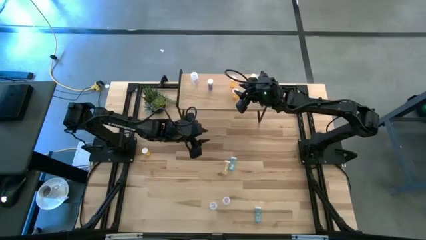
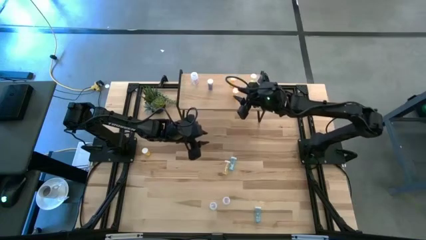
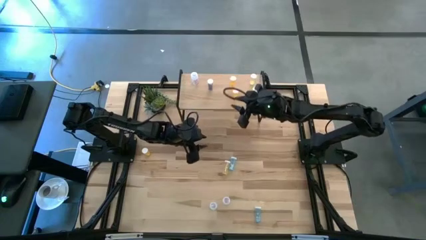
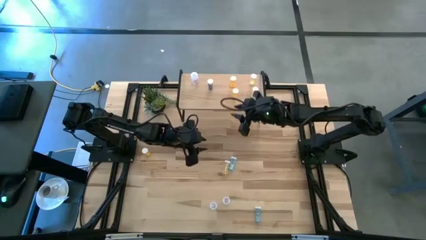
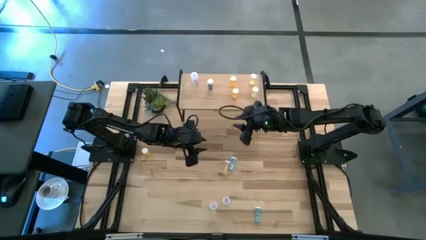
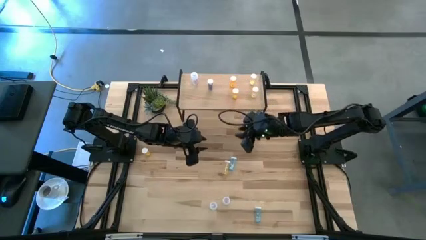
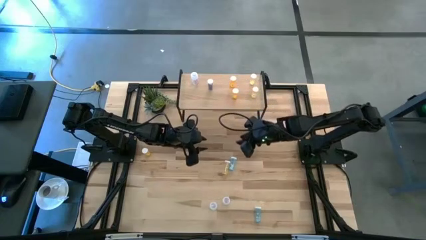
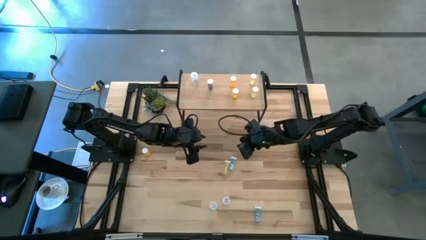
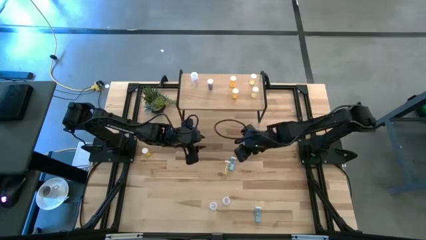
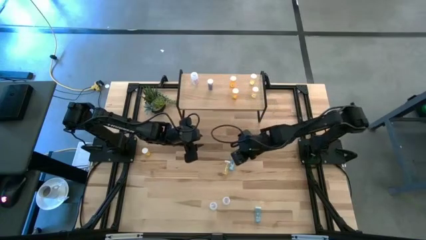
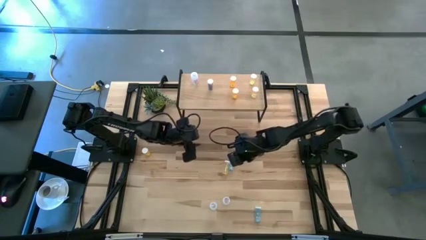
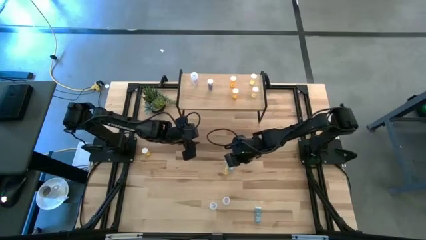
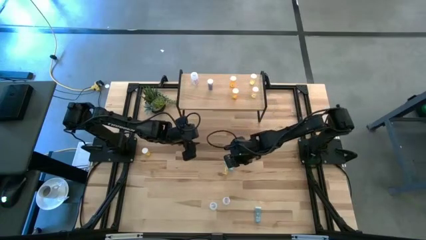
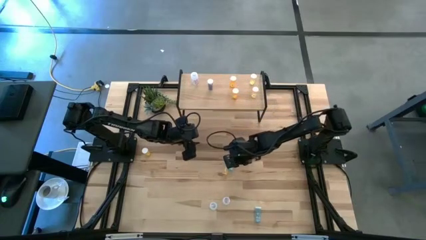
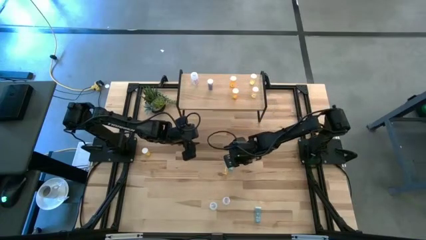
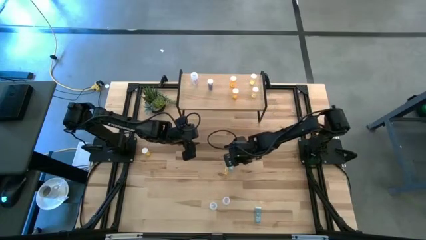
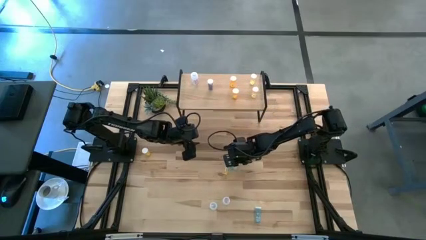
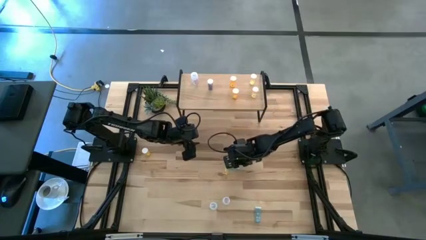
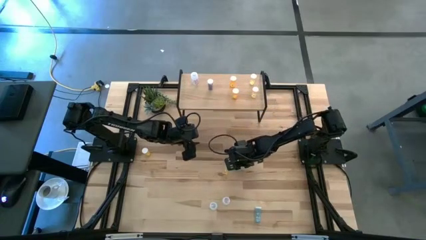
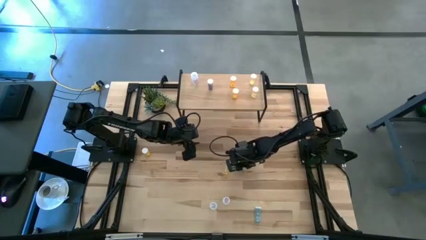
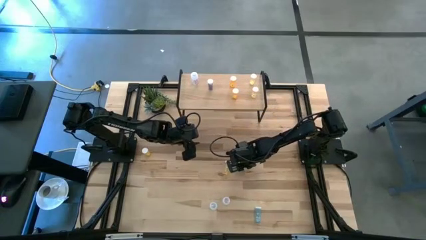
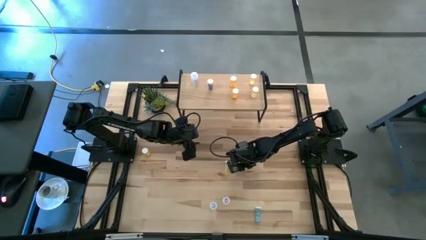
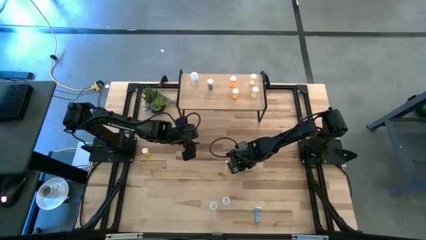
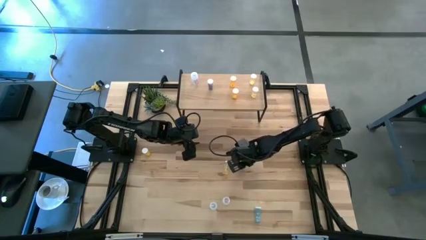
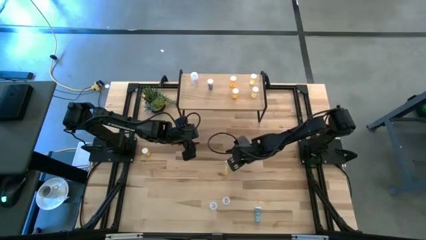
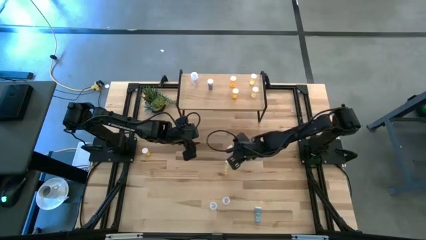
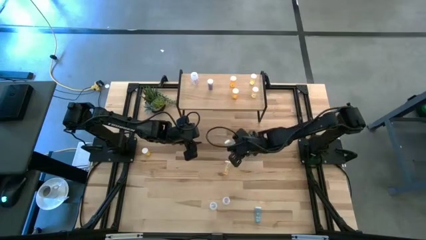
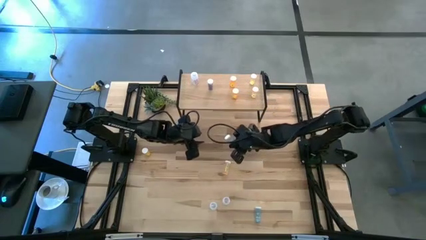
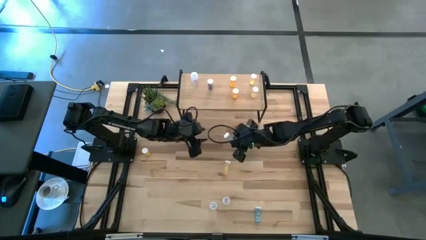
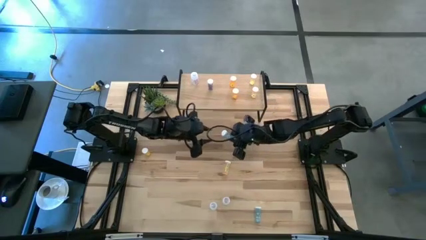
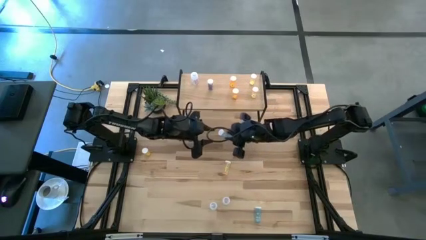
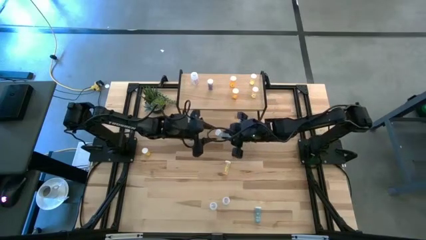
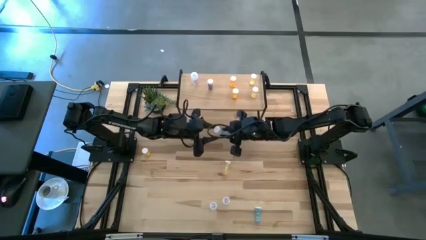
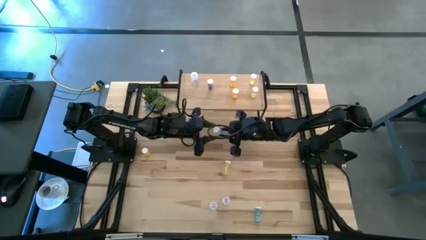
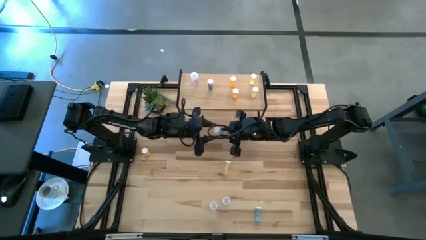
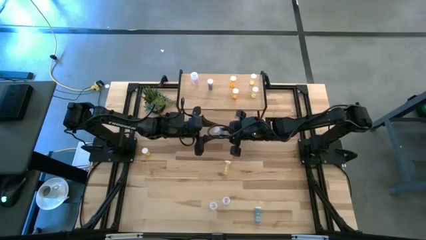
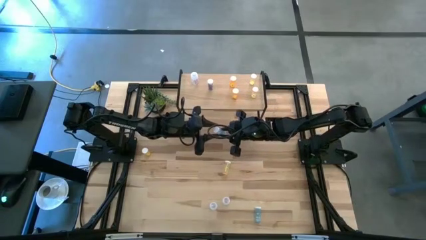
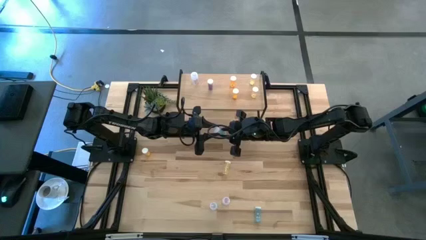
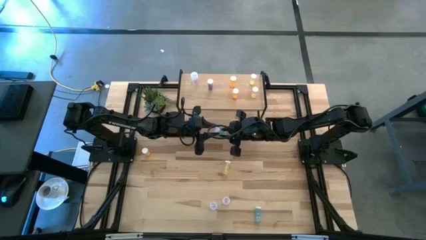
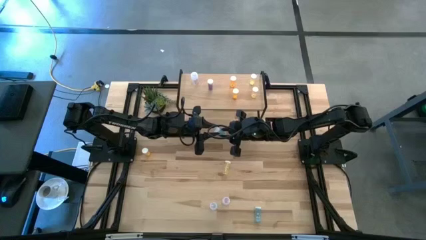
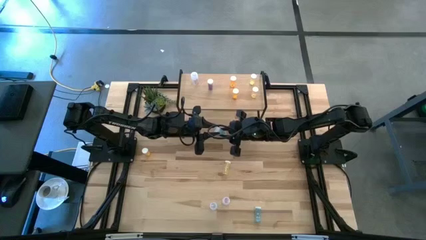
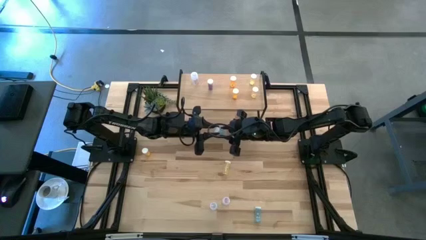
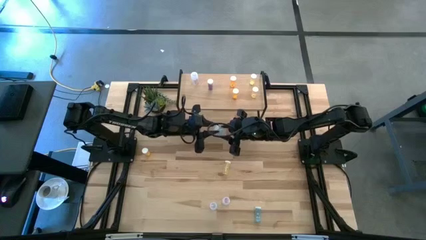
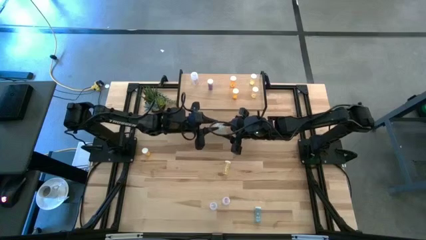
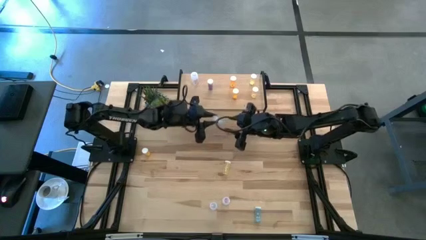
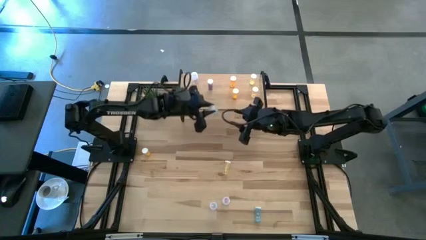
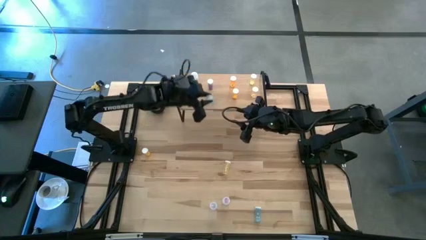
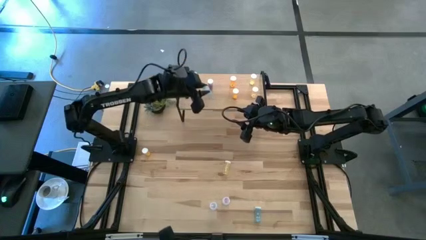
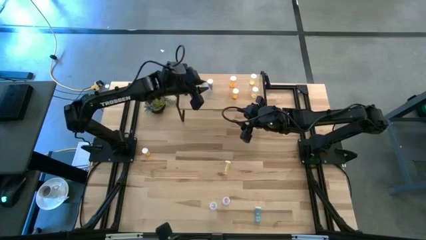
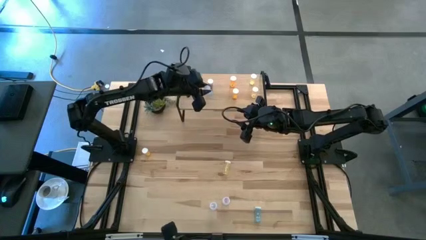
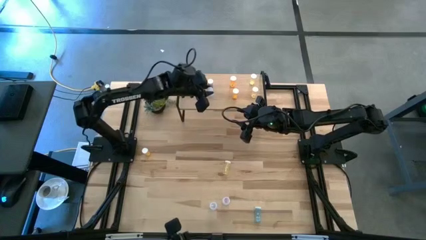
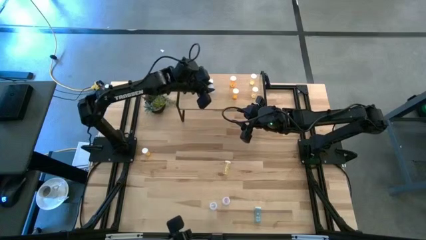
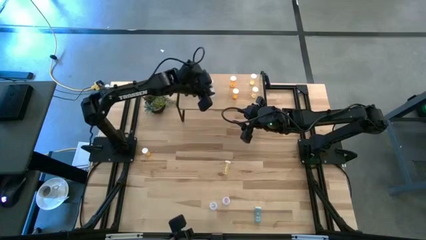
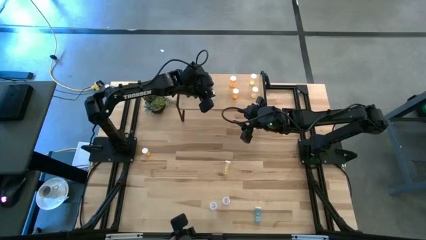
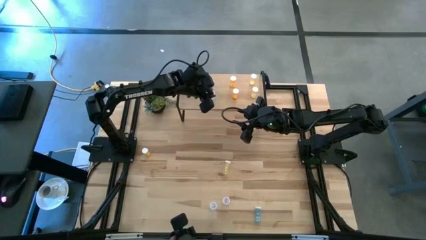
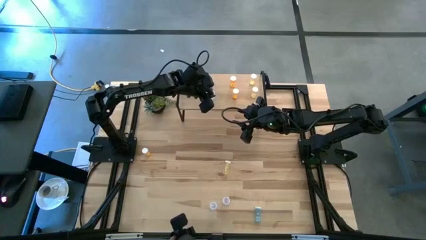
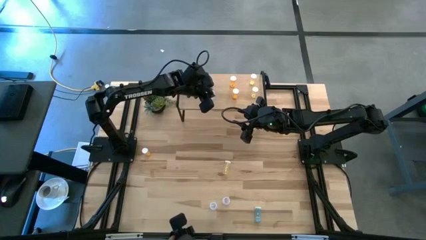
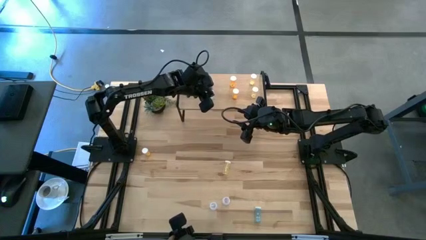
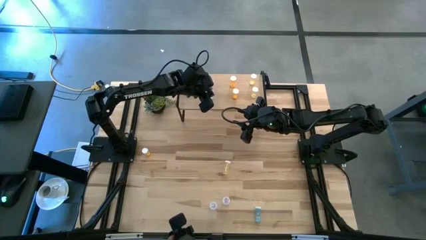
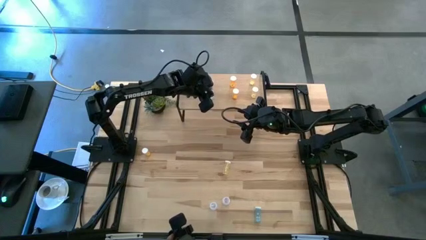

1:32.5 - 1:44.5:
Task: Pick and place medicine bottles onto shelf by color
Put the top blue pill bottle on the shelf aligned with the blue pill bottle

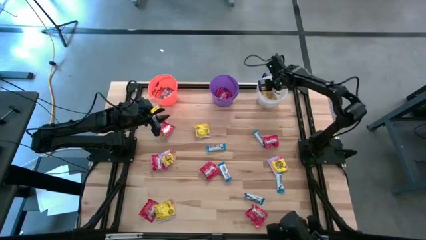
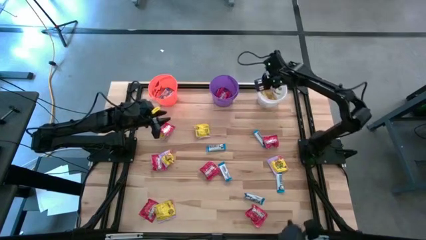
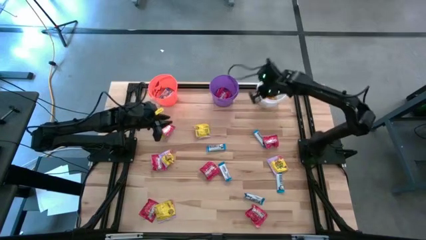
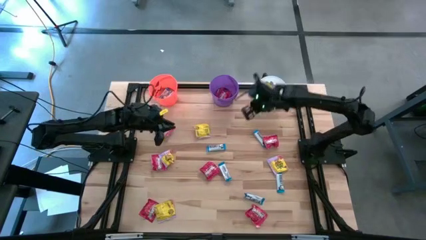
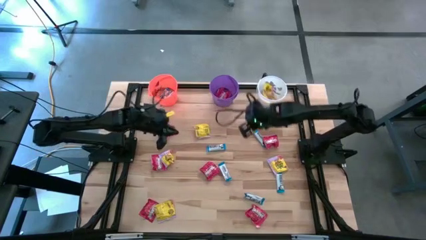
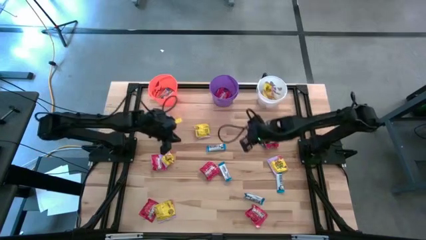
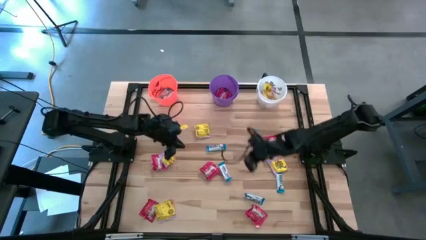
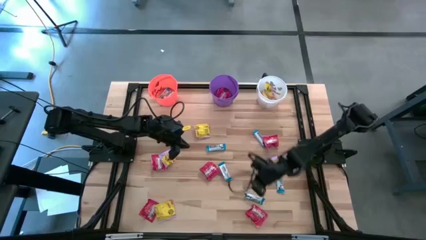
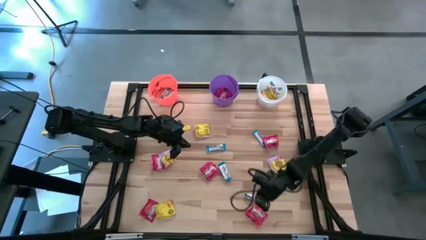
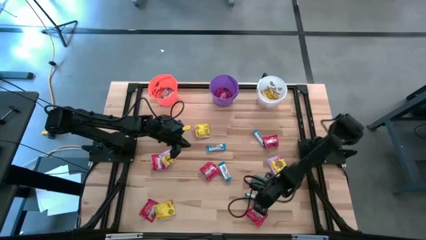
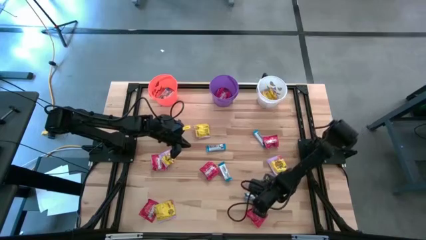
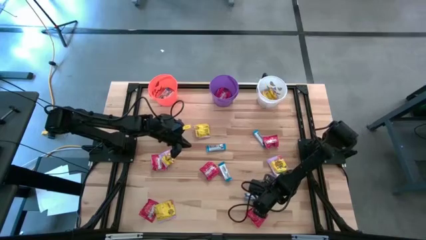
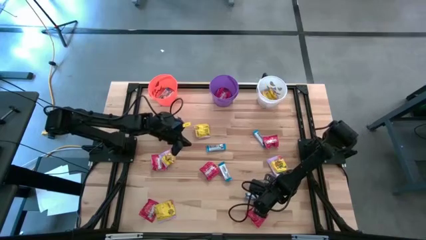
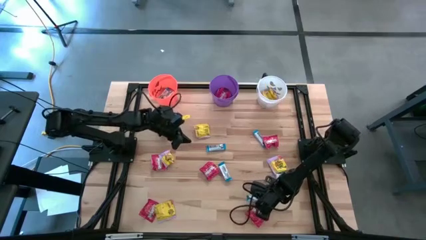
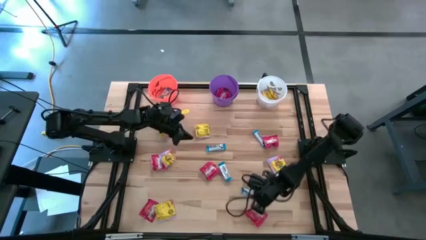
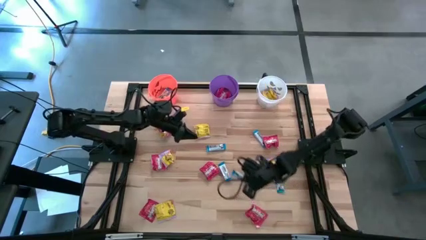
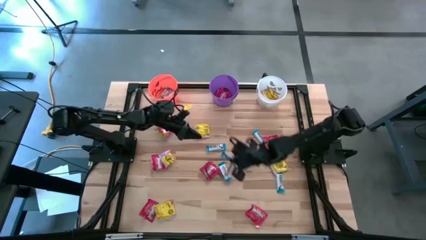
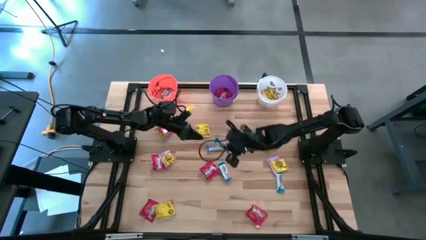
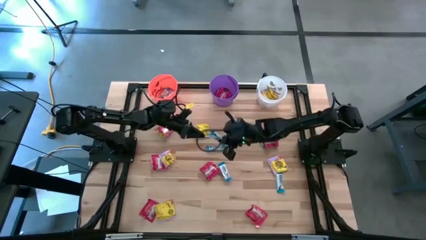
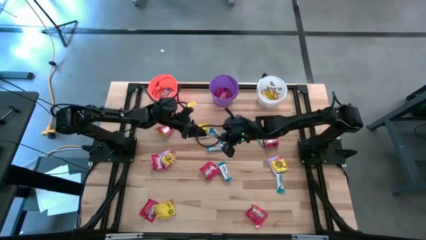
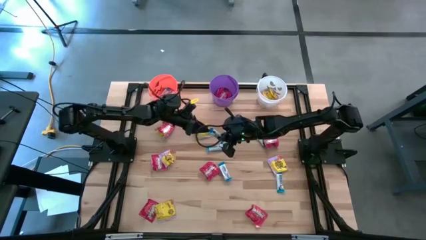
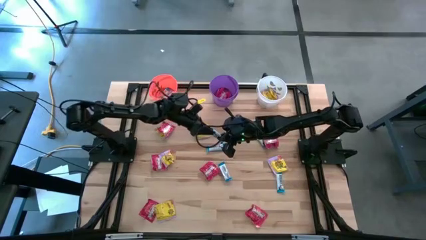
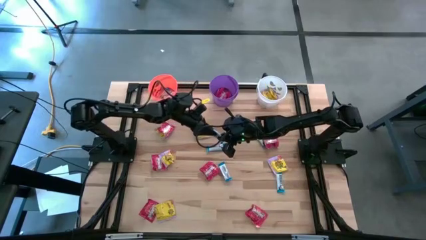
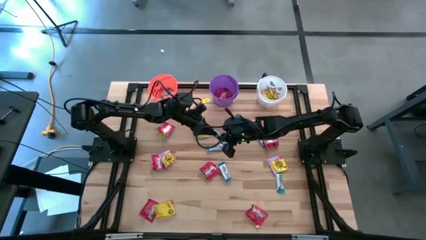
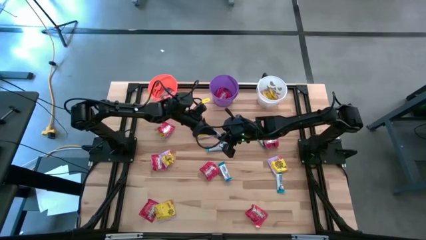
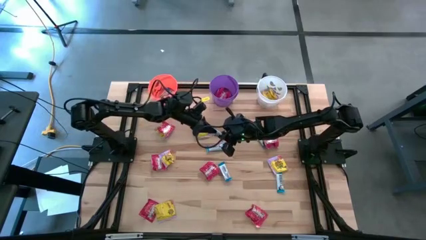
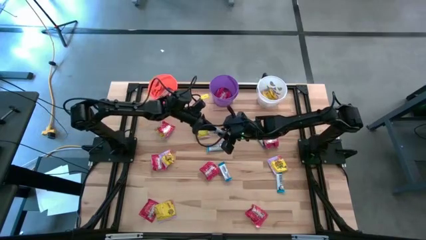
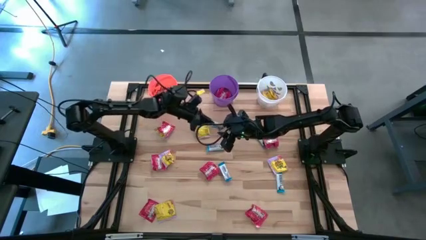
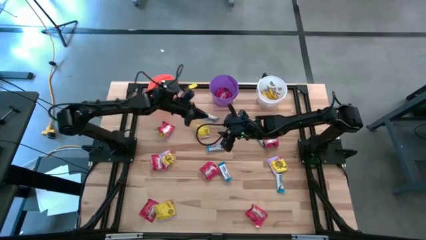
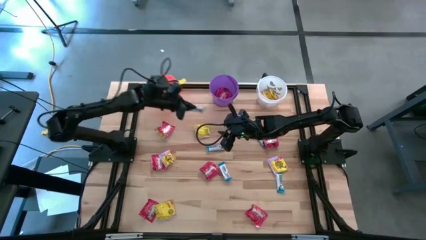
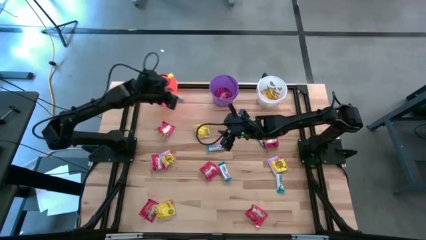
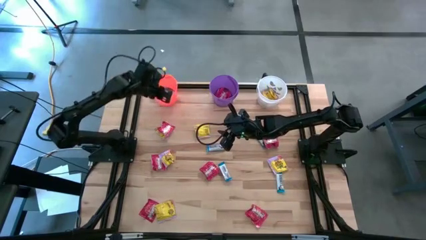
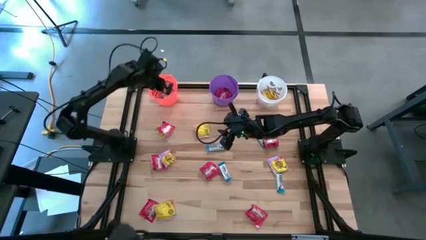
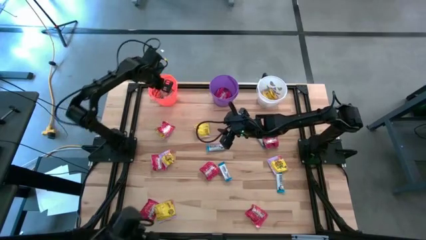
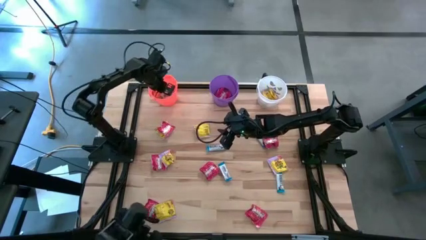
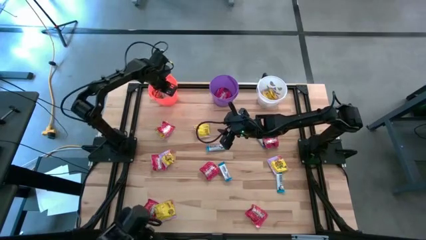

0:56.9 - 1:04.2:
Task: Sort candy
Put the white chocolate bar into the orange bucket
